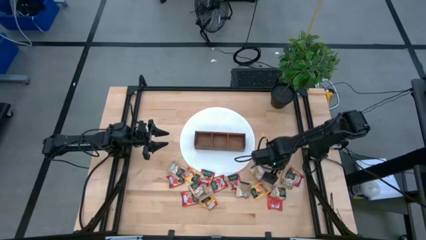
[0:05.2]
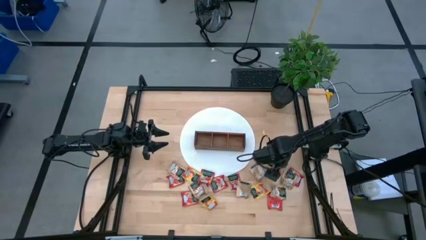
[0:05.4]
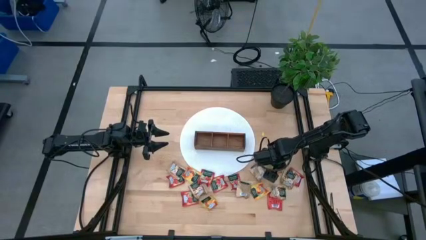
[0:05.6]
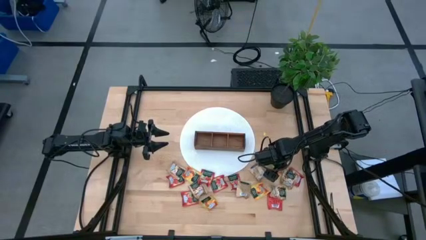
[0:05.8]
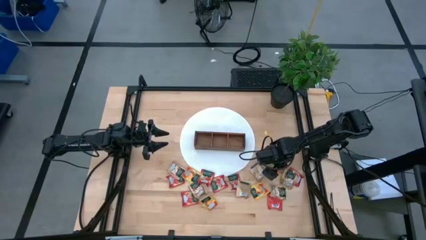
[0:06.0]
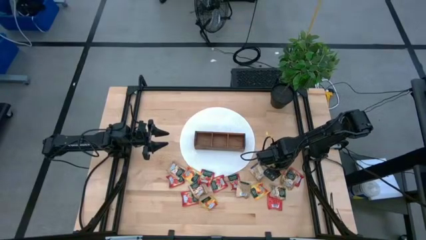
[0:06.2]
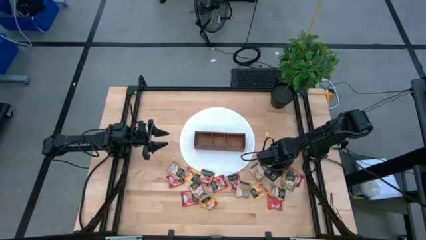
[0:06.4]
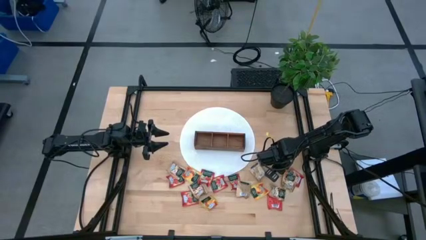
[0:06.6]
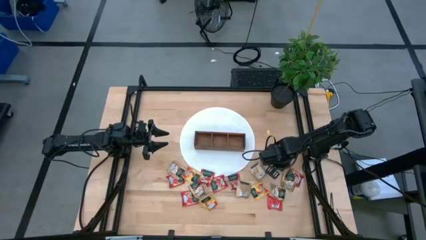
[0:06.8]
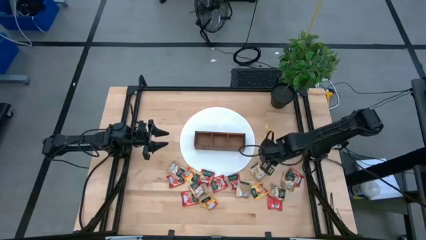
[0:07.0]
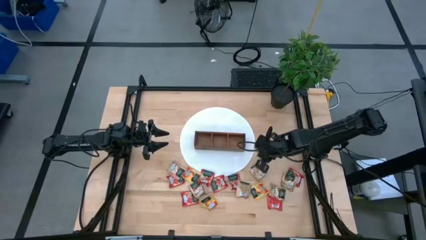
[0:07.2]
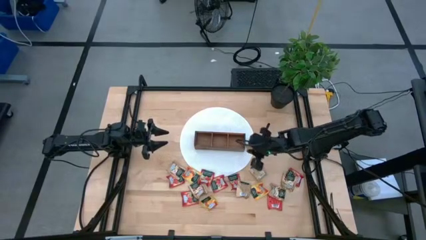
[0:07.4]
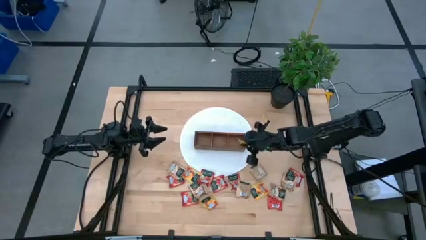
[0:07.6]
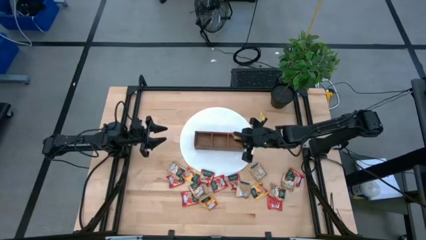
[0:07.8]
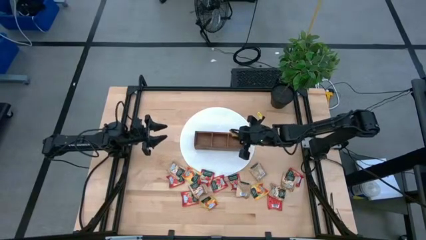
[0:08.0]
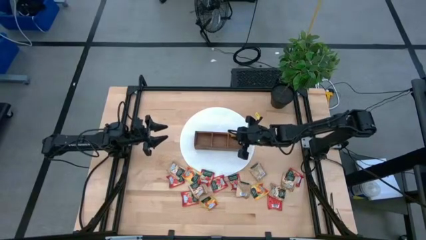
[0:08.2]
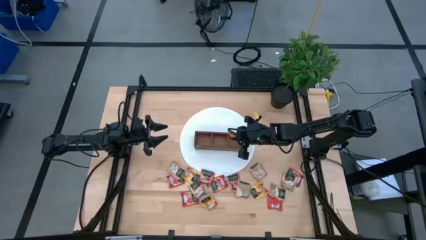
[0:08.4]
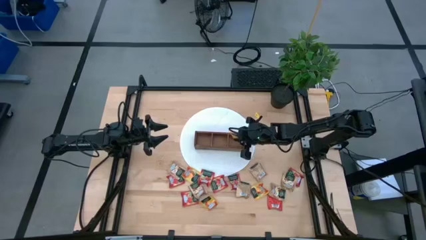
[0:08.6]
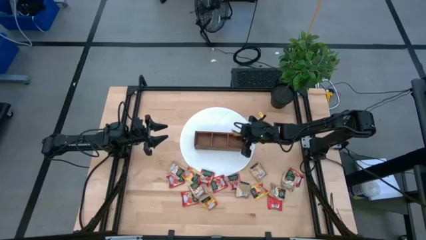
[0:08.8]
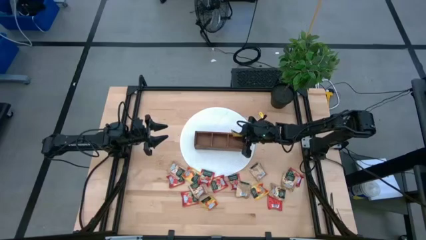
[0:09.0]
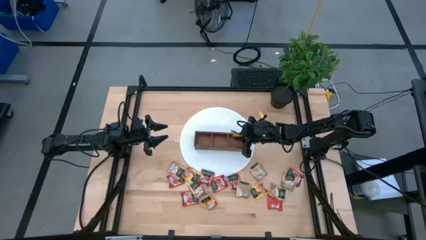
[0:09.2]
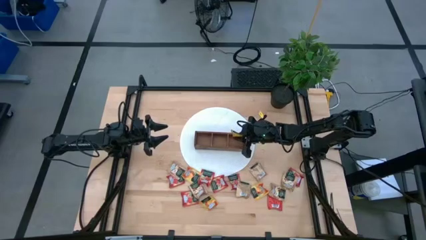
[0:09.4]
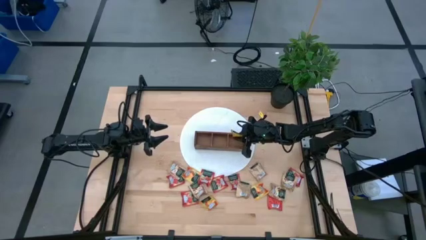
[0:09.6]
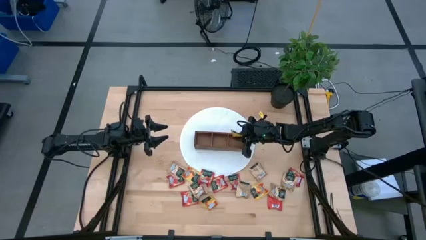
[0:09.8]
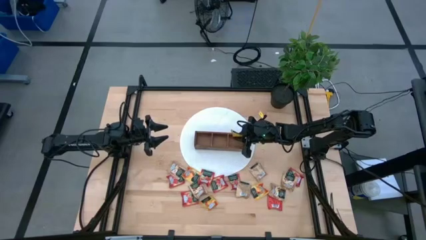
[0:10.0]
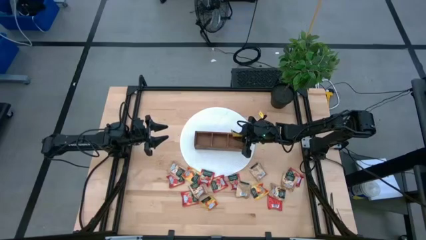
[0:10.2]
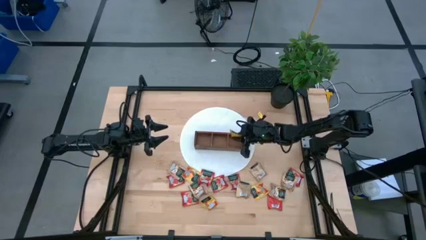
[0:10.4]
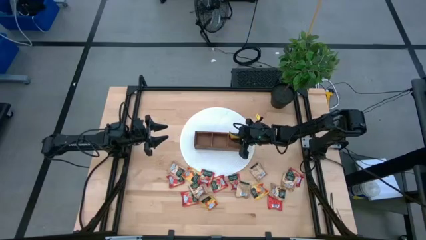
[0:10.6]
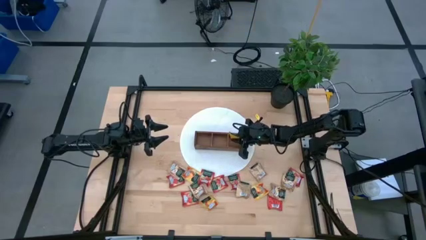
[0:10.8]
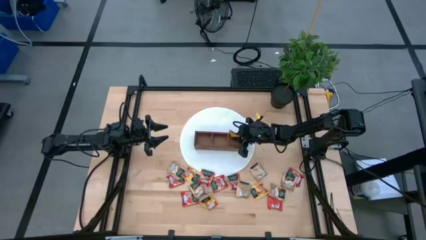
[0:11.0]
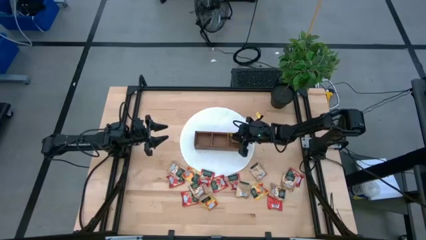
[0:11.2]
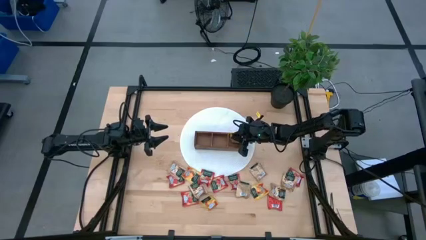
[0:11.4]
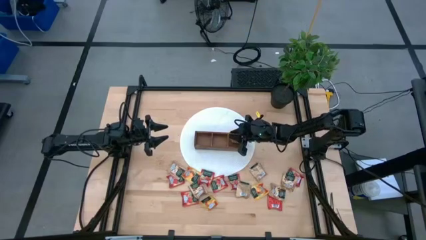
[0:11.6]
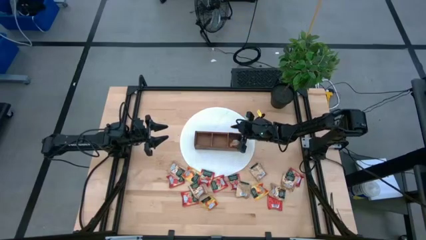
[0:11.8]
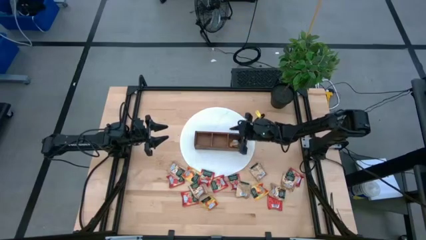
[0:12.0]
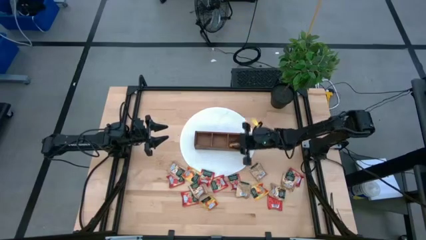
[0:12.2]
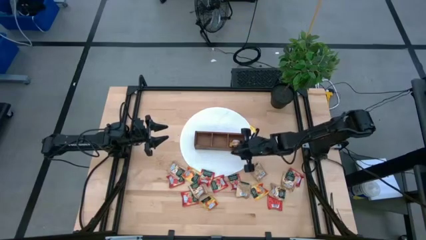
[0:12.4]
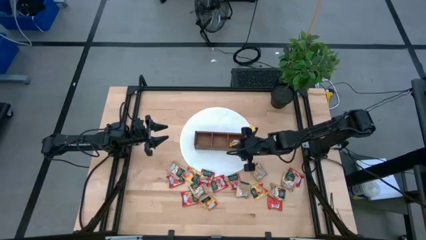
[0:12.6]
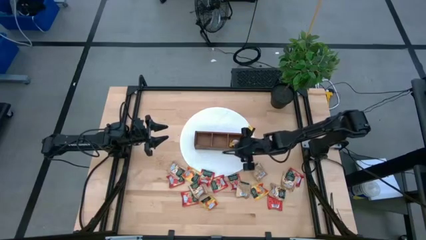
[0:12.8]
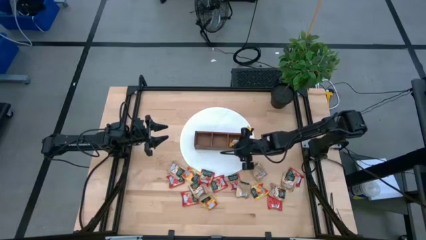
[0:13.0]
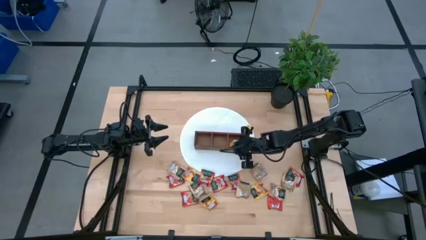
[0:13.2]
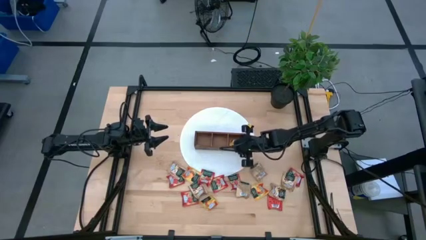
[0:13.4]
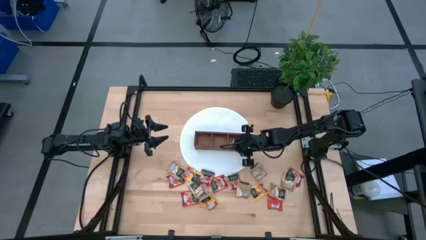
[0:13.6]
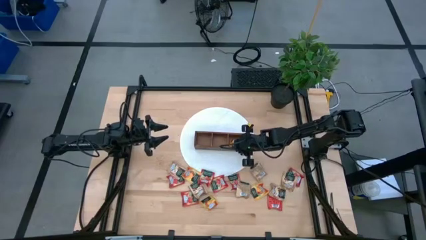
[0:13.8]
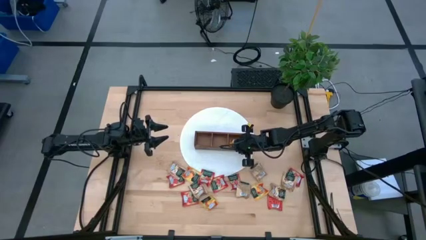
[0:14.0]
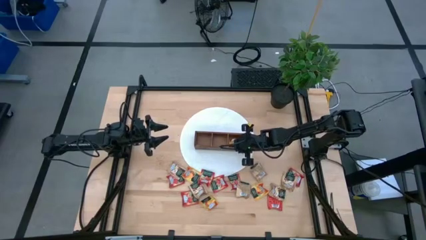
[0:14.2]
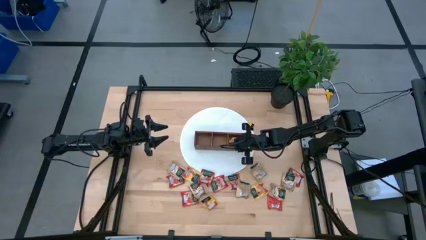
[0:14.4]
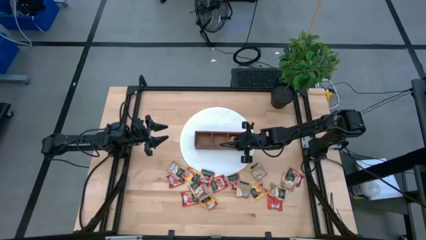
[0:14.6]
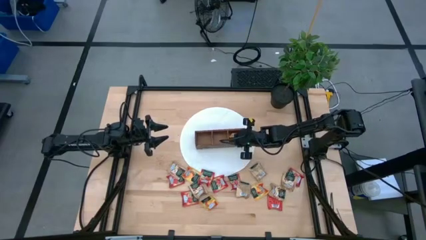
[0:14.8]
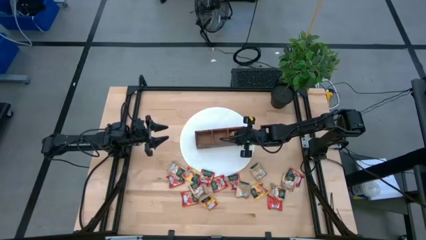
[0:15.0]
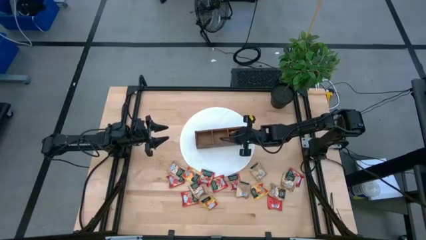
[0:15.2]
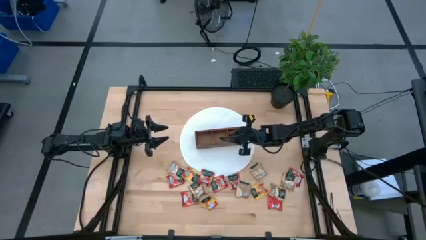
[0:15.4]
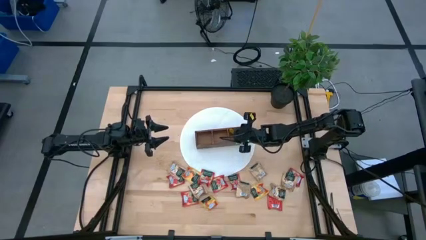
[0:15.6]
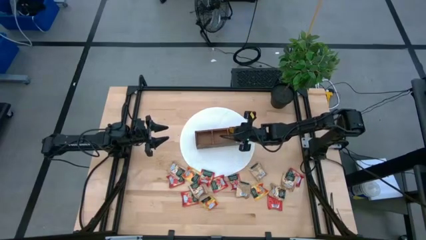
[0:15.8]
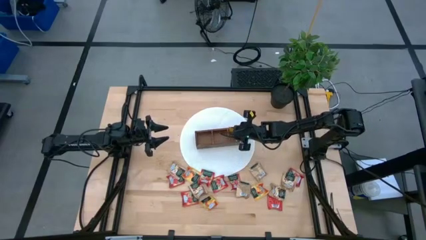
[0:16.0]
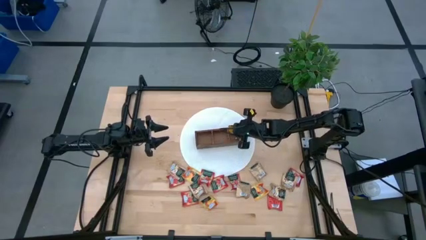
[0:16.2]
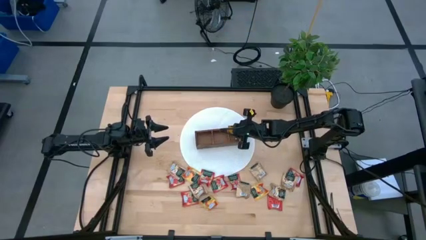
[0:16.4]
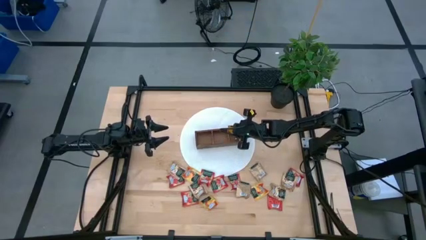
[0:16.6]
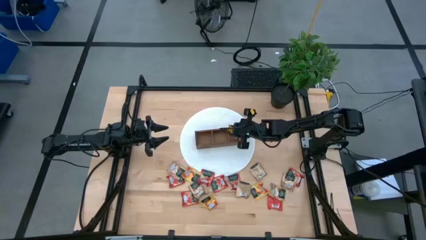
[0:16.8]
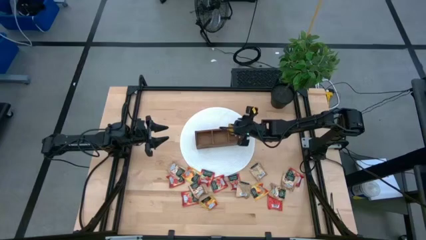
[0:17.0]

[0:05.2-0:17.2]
Task: Pick & Place Tea
Put the yellow tea bag into the right section of the wooden organizer
